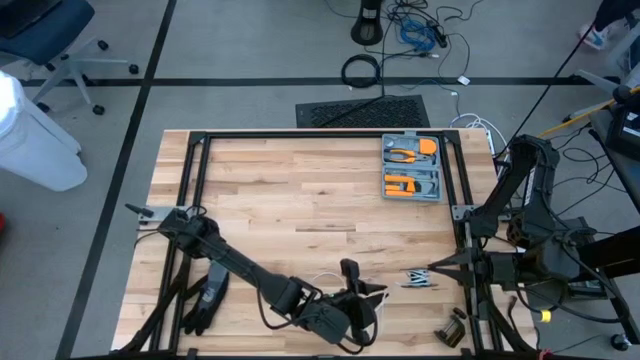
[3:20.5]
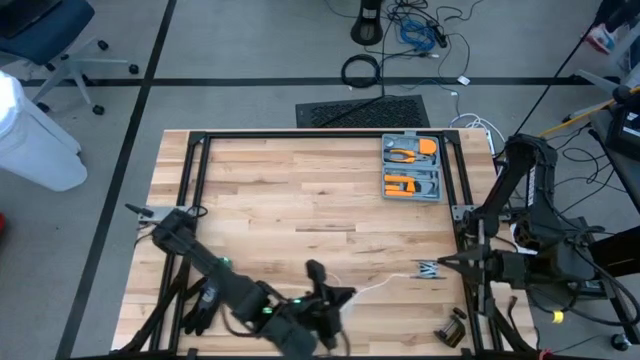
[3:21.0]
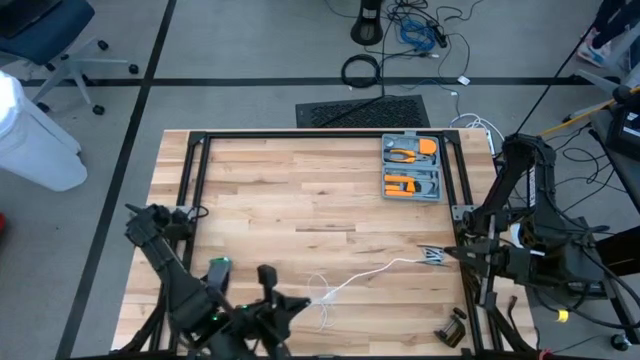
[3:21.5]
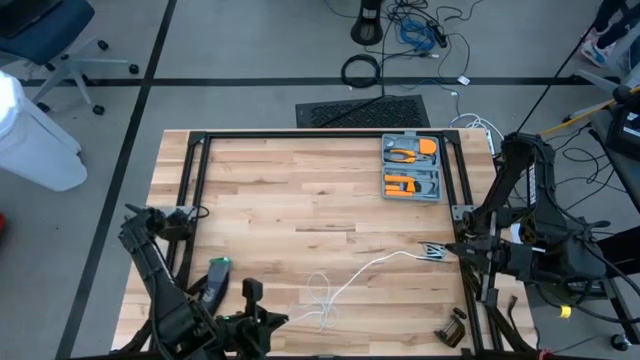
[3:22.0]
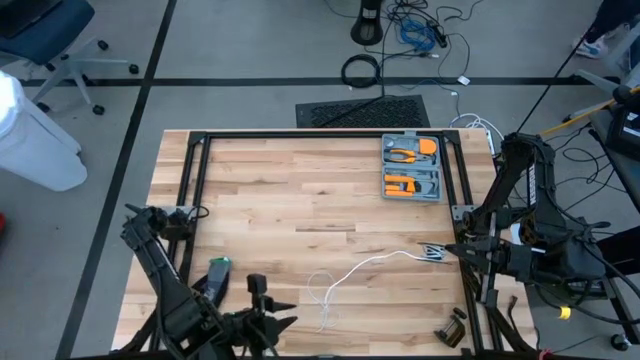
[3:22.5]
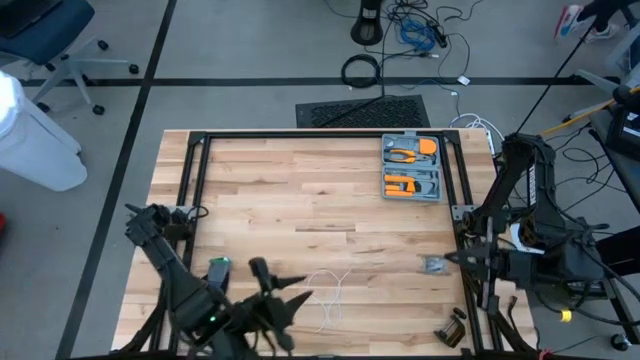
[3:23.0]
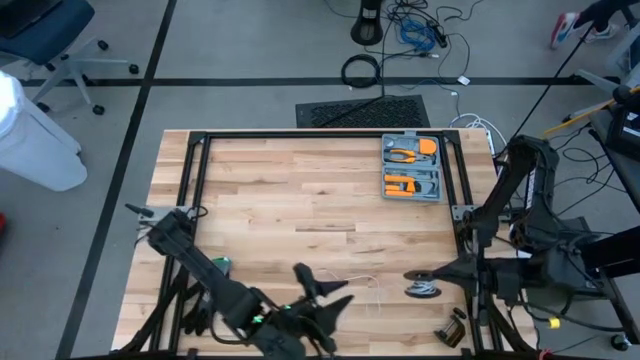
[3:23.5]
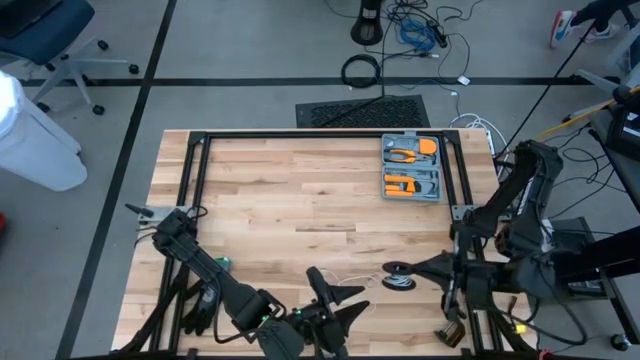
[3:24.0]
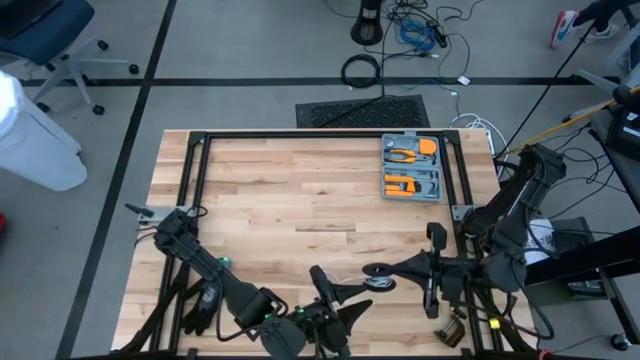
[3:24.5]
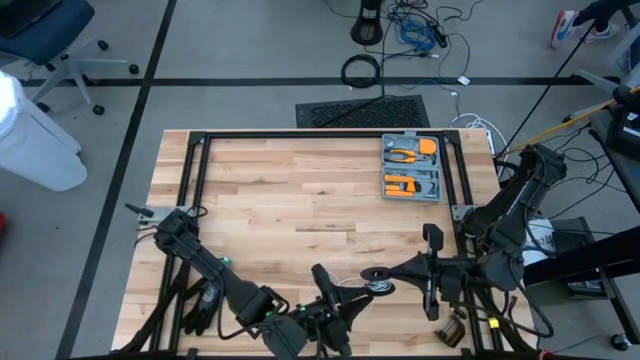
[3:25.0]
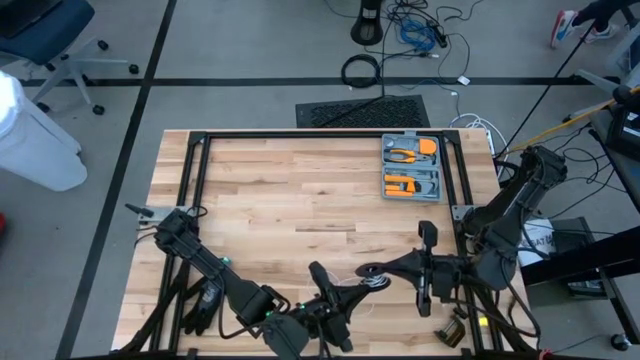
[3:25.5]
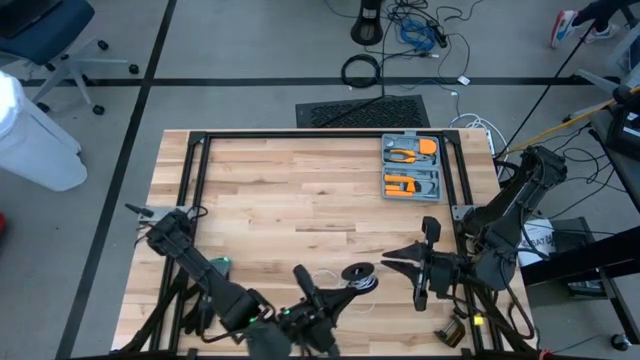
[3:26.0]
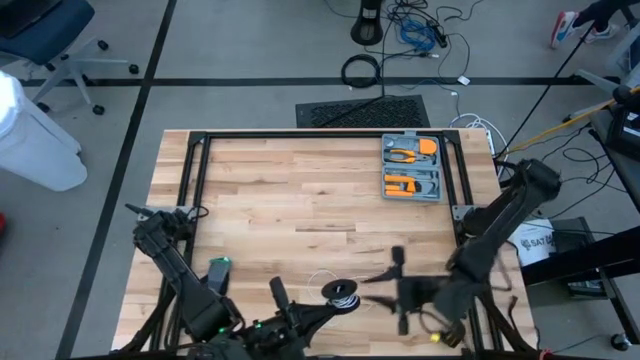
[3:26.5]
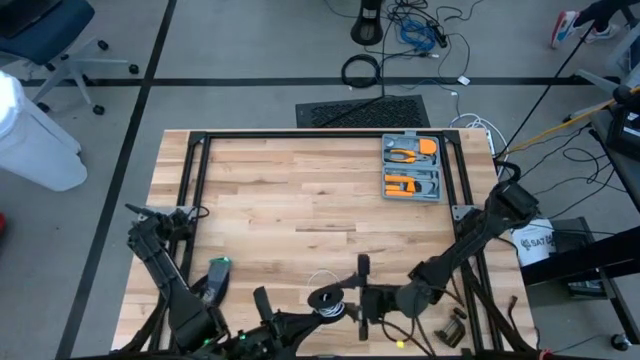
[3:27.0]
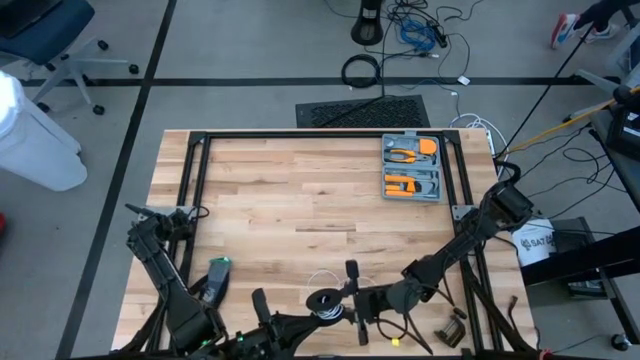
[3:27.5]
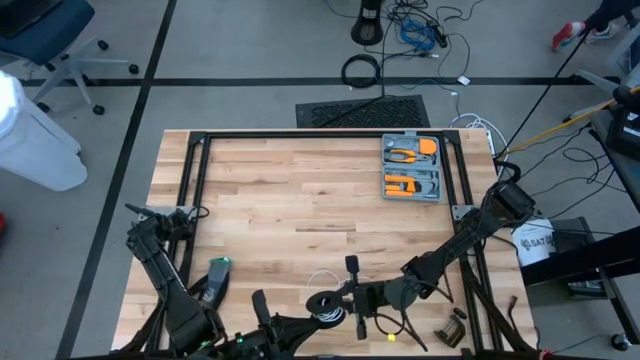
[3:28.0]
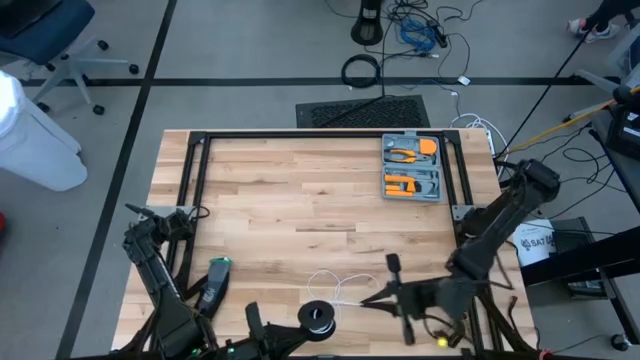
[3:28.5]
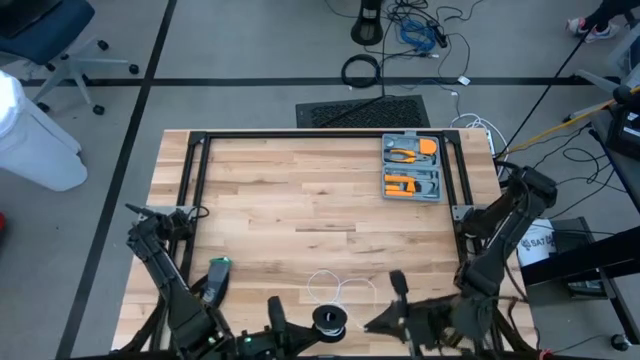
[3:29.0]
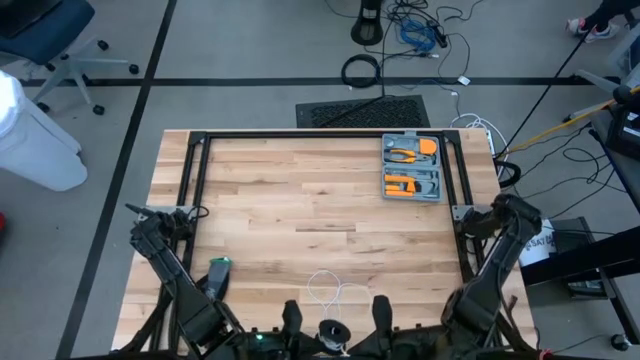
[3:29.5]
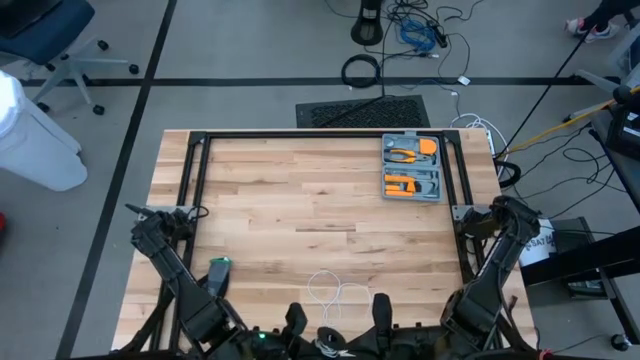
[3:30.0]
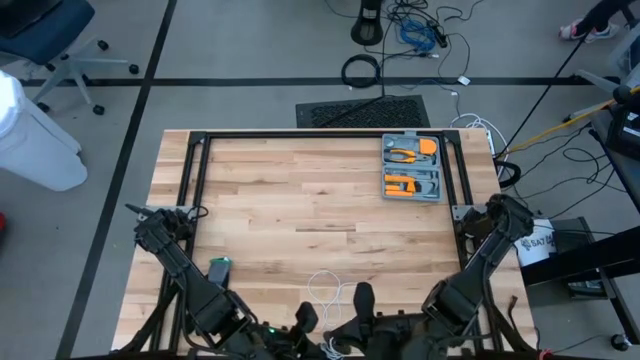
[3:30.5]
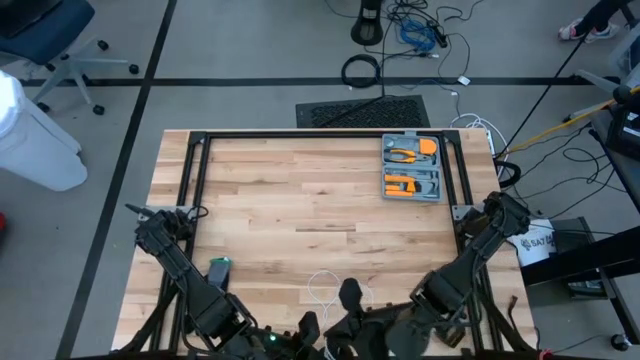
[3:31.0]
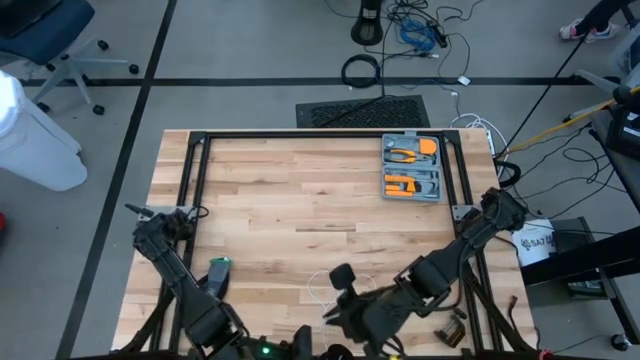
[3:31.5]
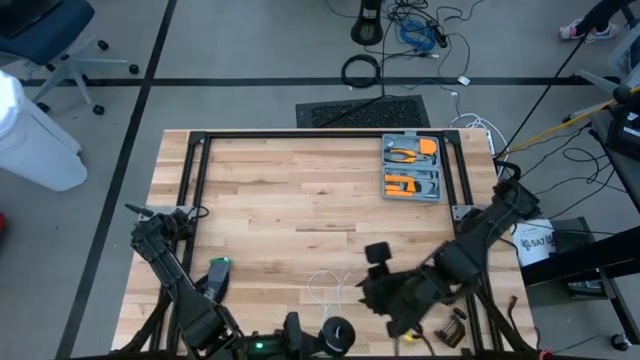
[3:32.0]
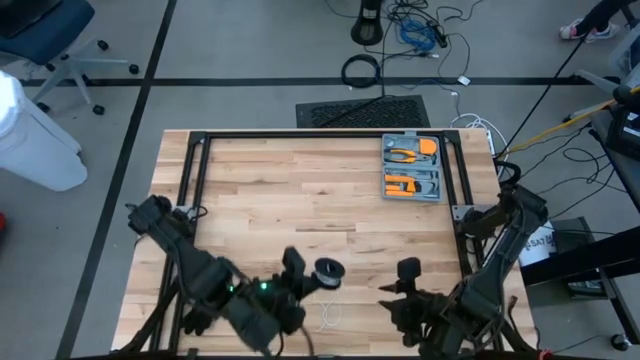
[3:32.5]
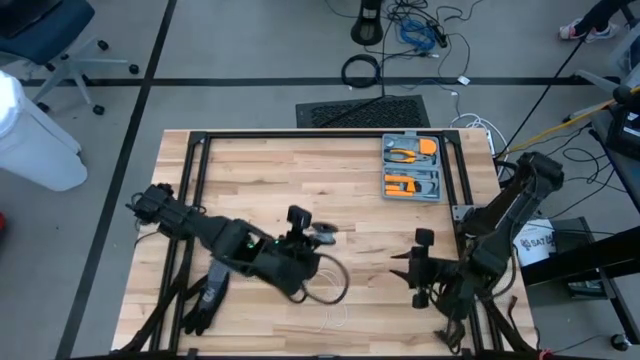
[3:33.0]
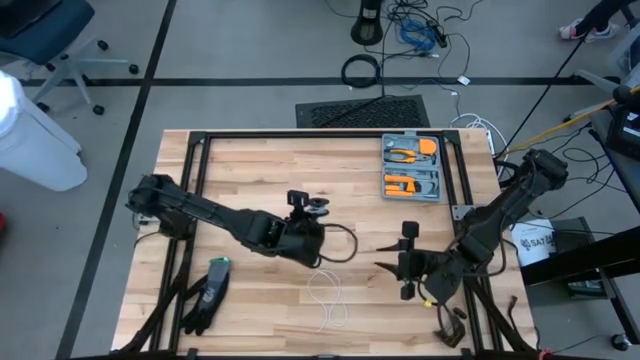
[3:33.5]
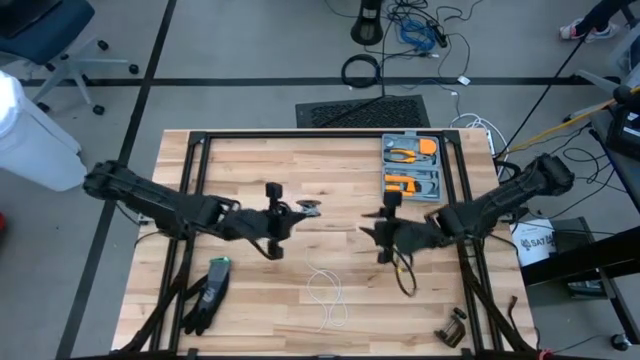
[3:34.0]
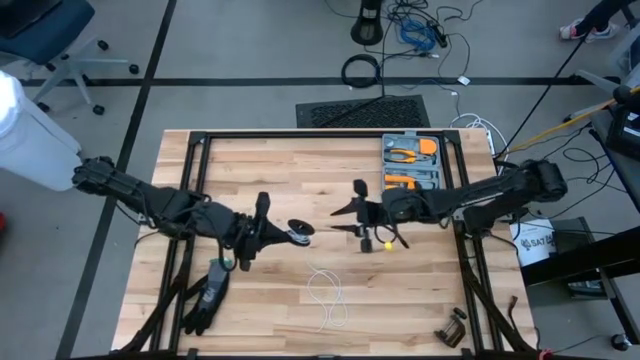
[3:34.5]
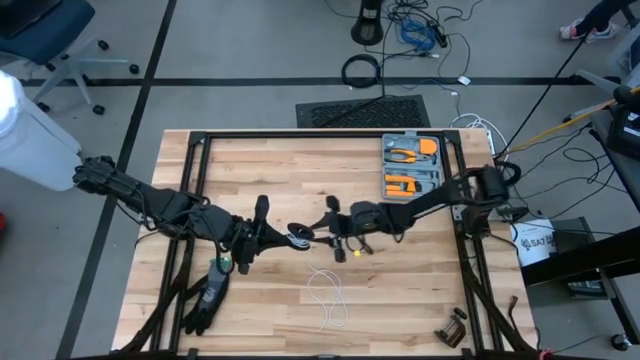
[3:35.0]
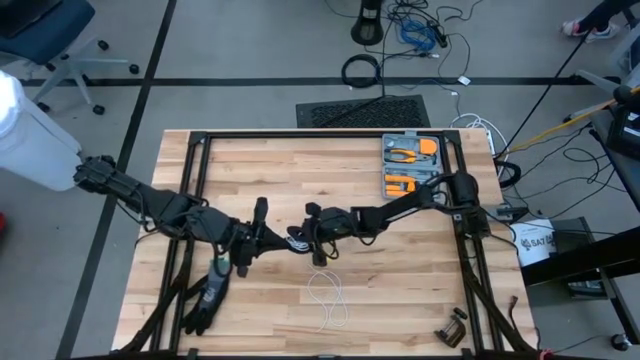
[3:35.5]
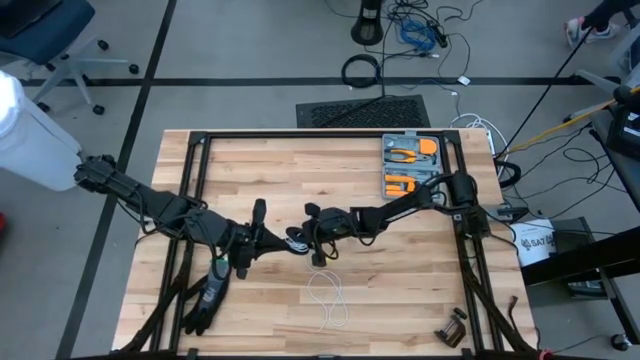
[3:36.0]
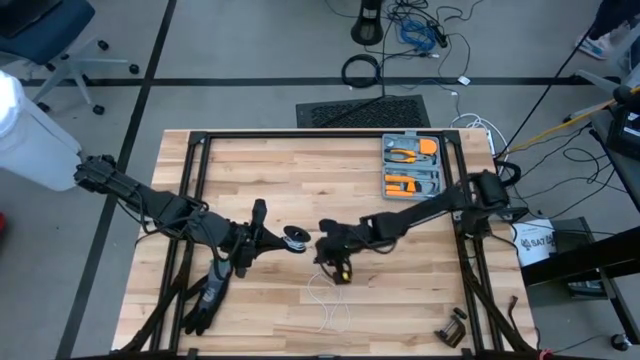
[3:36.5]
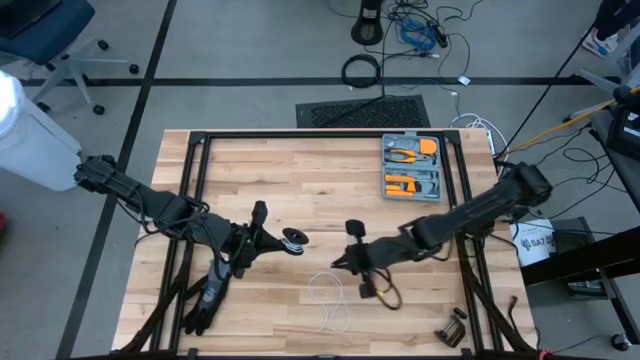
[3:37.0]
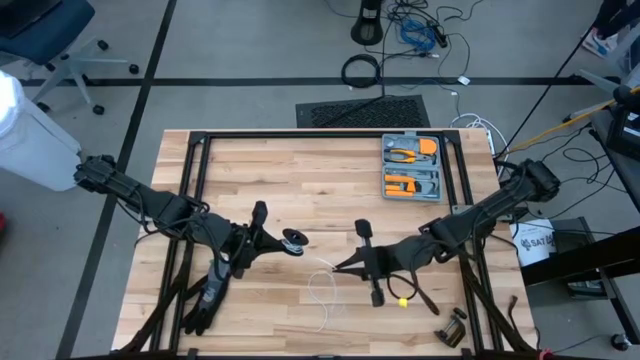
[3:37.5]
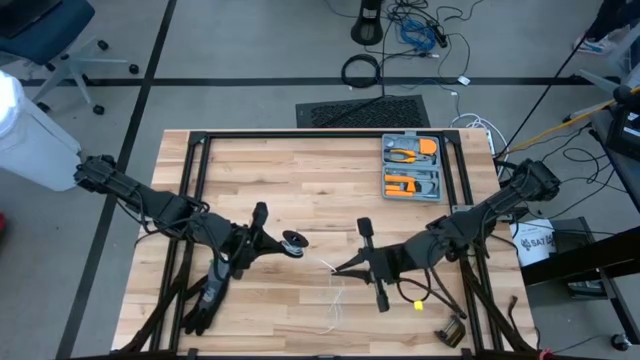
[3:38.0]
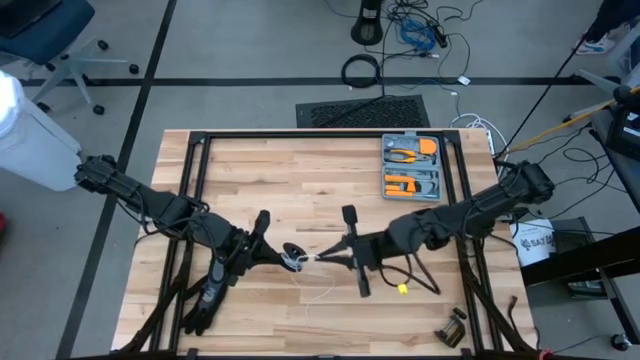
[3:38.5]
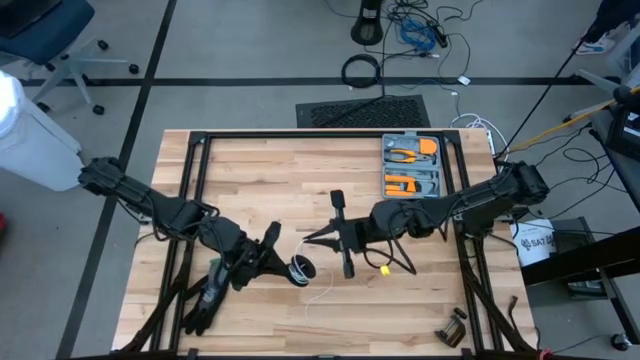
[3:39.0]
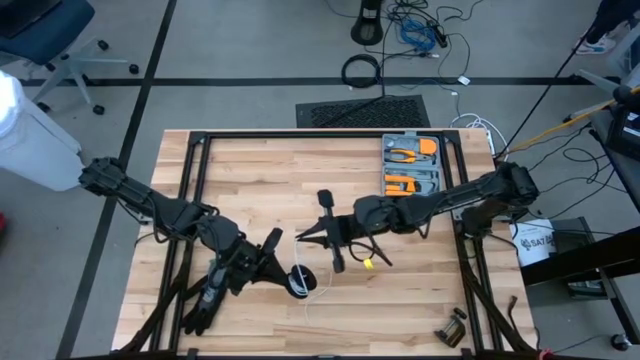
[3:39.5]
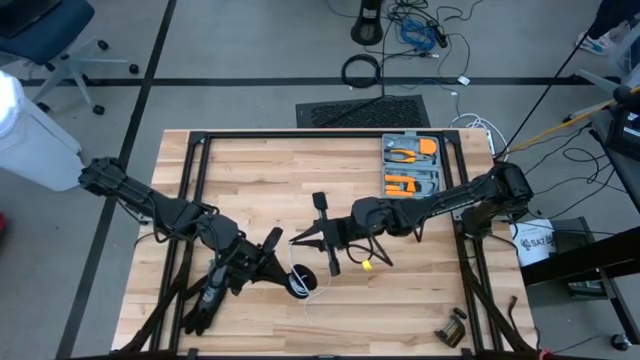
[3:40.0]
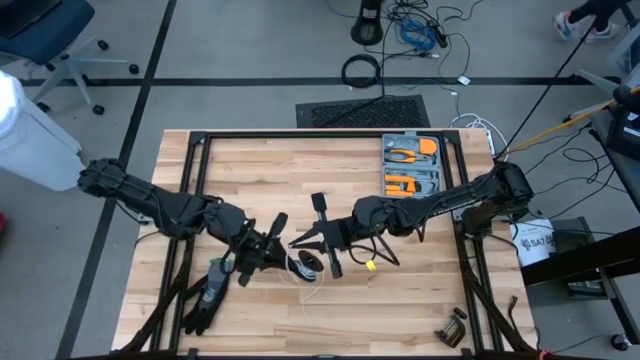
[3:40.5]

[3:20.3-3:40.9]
Task: Coil cords
Coil the white wire onto the spool
